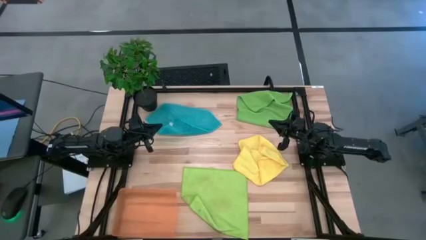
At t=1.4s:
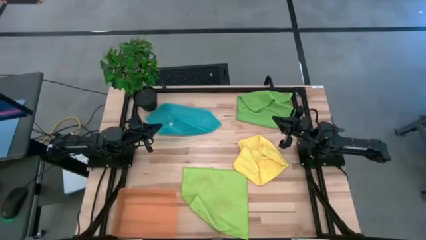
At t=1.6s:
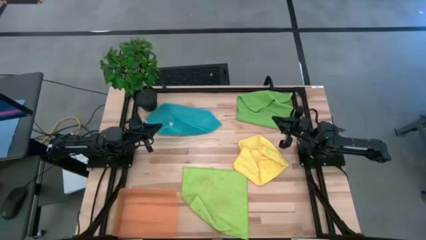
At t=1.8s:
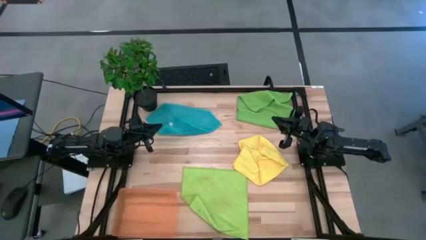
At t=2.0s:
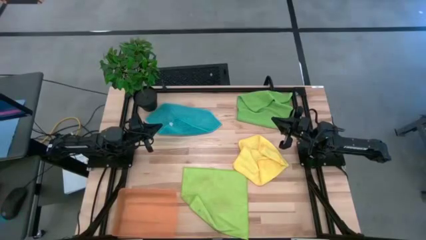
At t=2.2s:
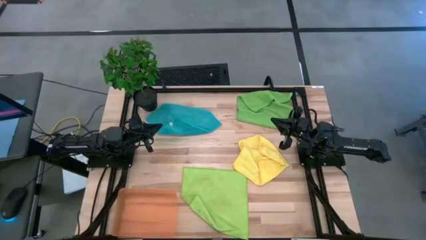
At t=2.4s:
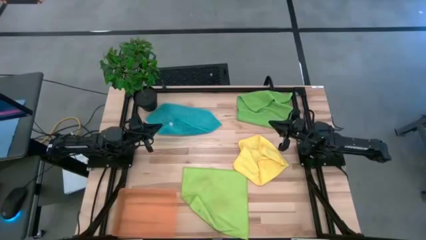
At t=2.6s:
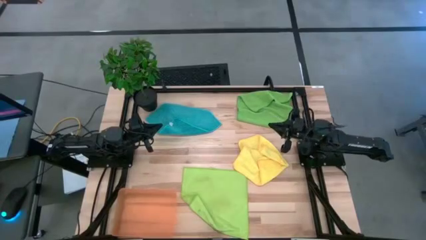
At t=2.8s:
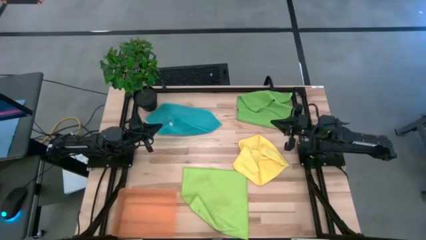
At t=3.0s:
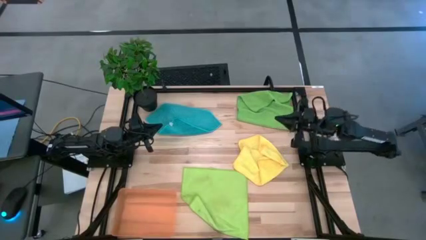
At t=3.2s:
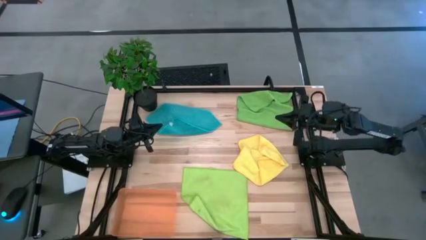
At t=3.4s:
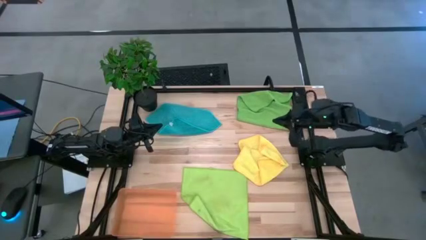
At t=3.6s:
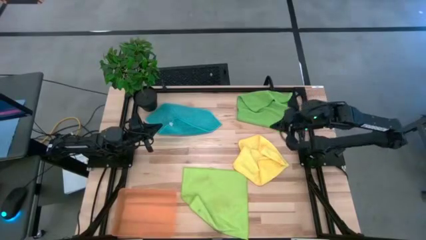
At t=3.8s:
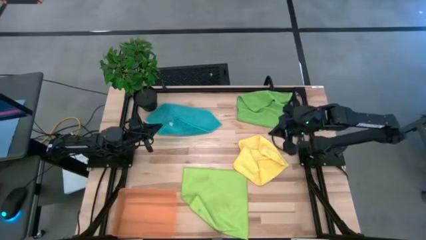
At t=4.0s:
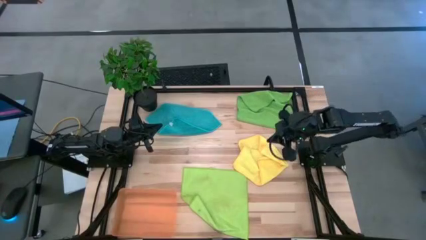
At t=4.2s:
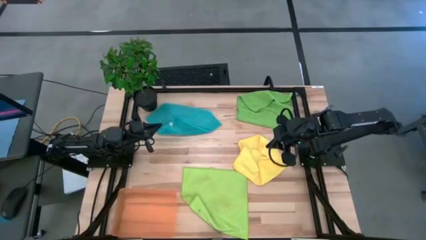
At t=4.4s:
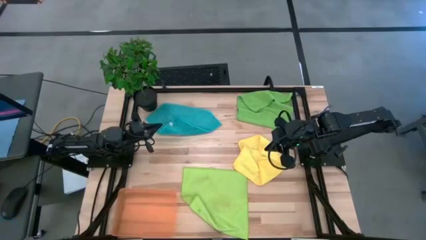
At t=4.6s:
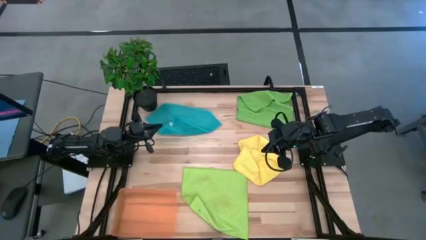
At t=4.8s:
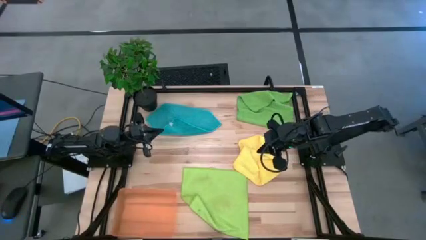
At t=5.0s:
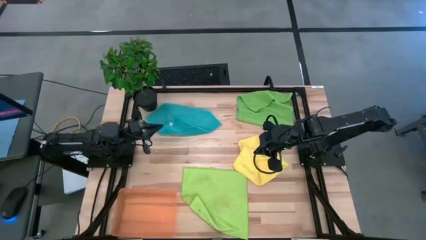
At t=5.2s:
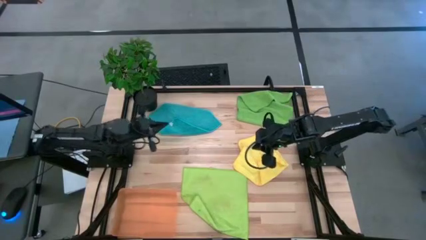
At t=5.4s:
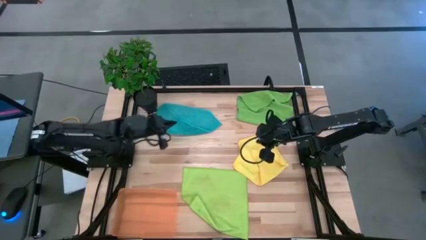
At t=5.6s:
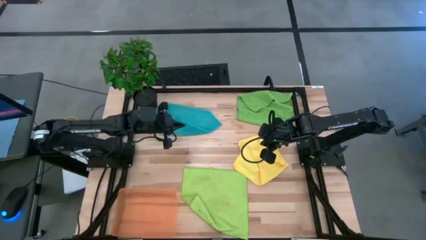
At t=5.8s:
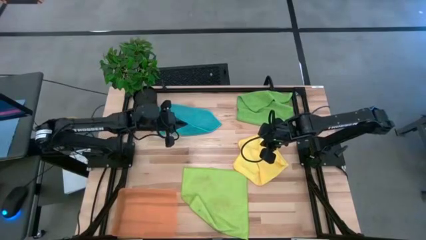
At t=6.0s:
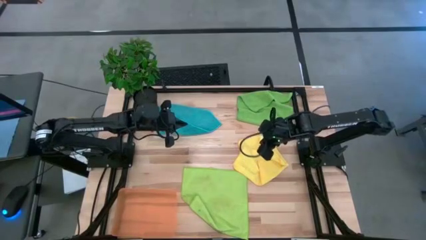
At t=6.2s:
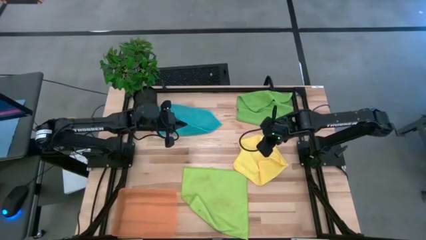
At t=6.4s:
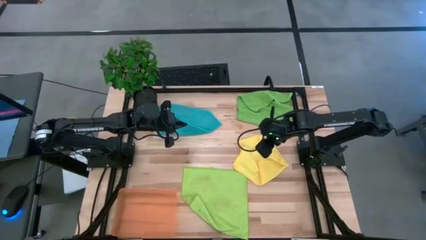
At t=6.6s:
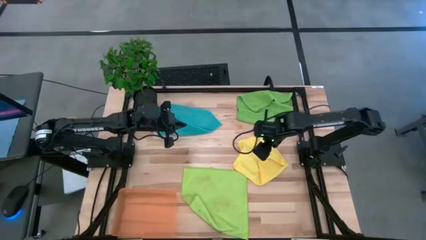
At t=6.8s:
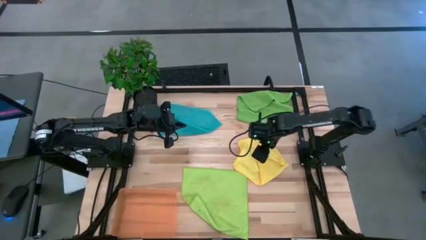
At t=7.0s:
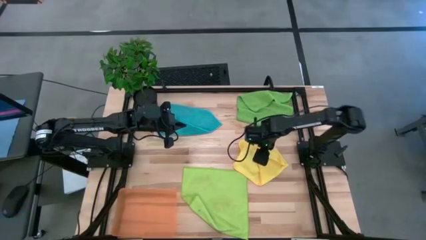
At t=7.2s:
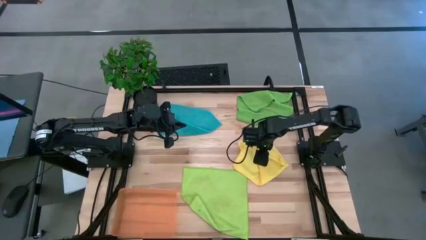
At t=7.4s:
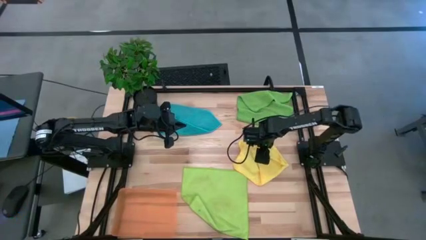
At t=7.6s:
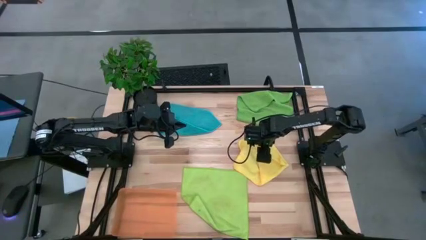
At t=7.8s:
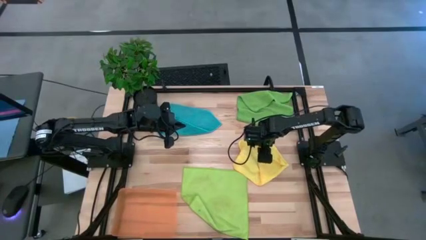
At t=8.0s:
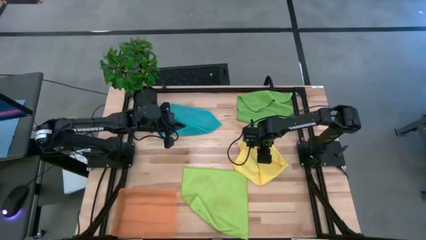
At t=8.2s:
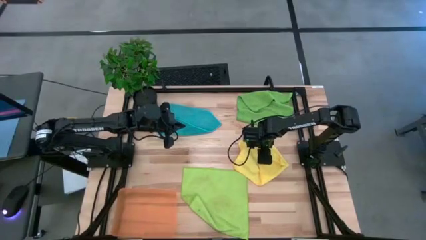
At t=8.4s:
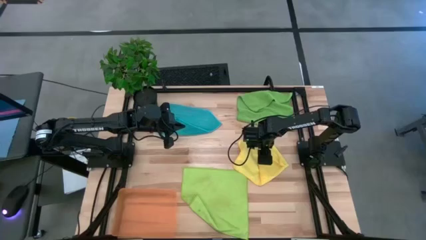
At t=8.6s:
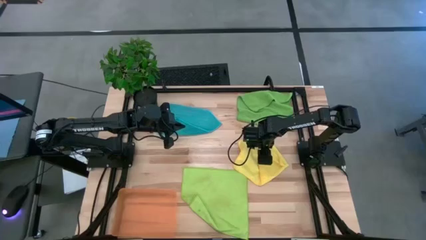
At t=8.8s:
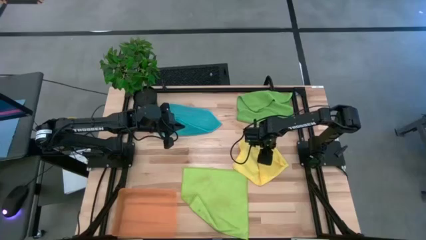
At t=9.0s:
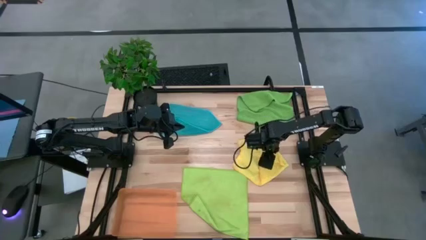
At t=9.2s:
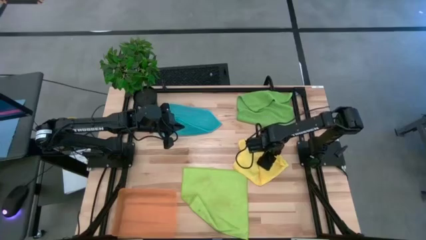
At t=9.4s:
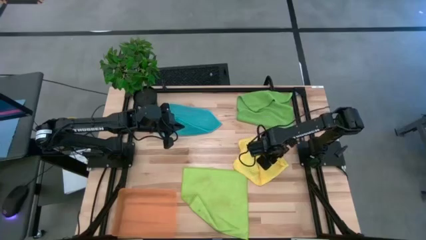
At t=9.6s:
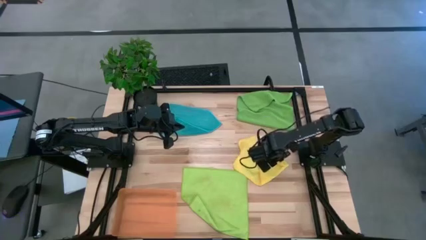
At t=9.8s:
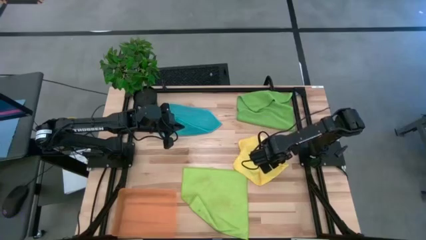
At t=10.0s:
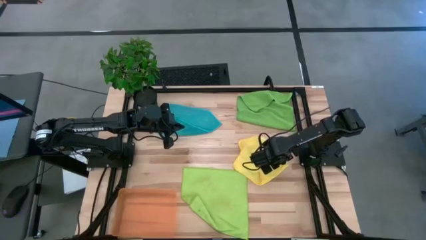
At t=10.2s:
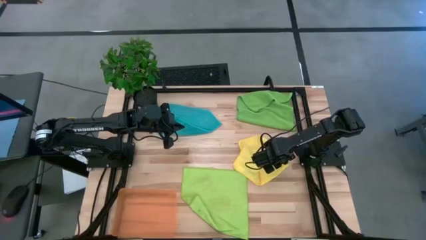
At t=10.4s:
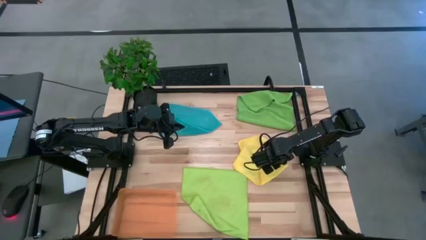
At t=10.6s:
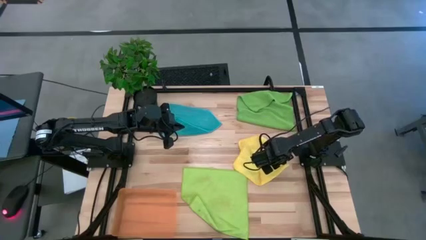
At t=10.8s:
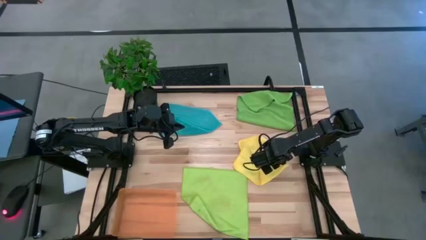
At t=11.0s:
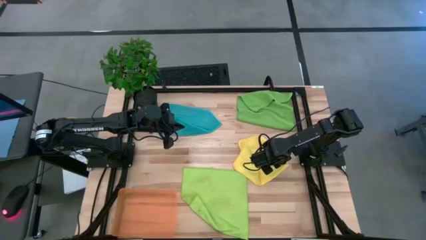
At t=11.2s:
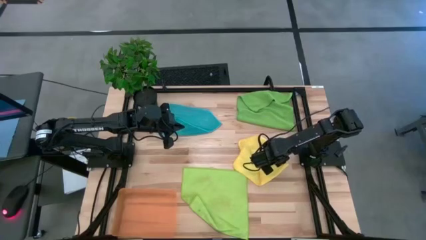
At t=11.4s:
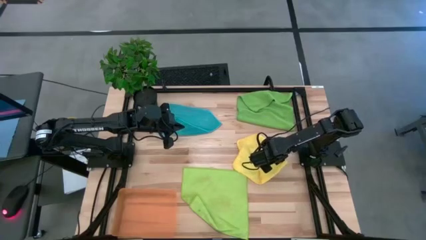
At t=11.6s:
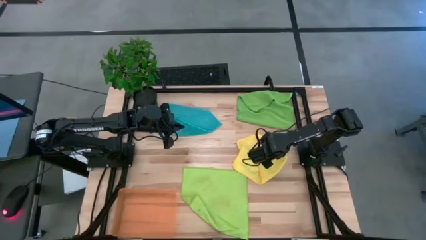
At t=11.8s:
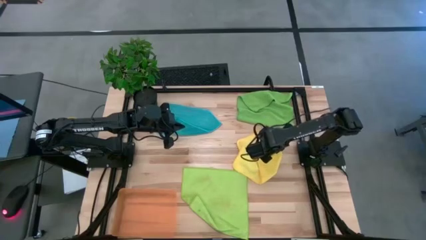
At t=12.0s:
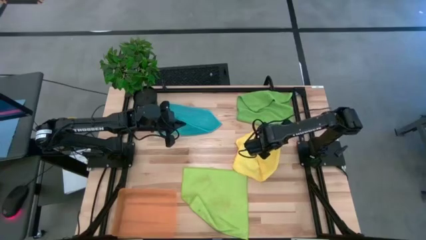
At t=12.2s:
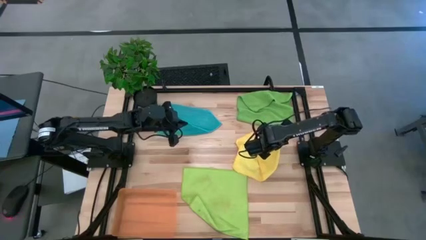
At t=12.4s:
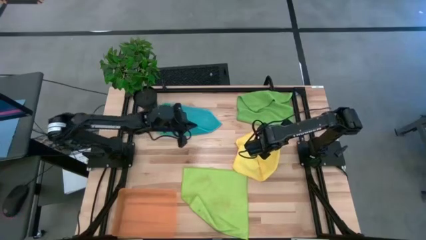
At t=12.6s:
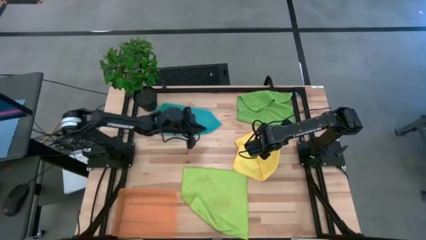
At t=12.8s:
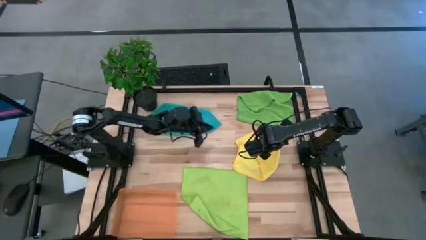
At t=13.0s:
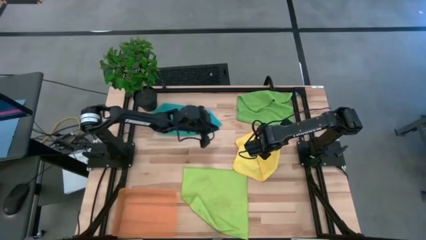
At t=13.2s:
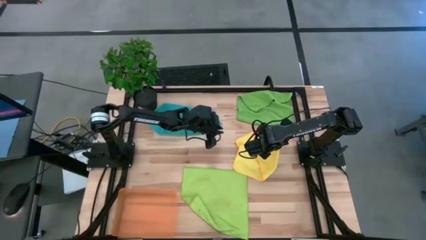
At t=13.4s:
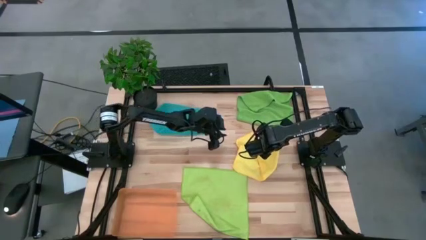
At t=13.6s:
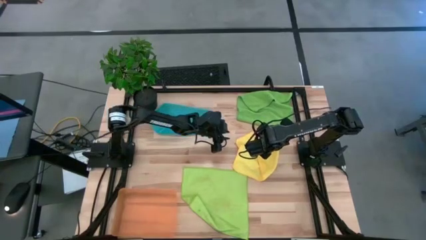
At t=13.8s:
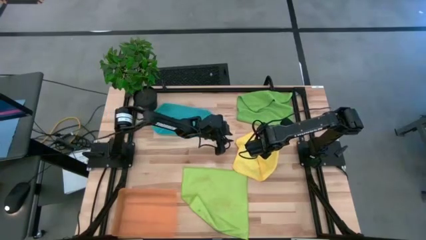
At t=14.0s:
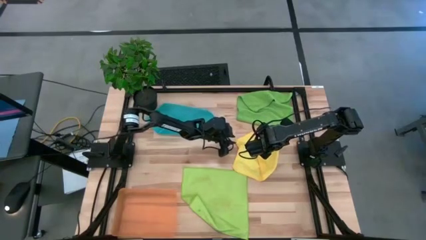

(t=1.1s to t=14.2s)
Task: Fold microfiber towels
Fold the yellow towel
